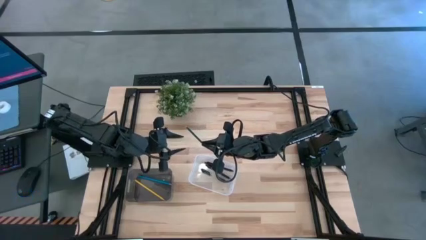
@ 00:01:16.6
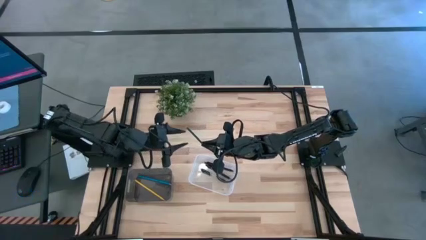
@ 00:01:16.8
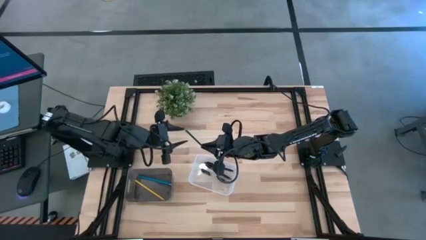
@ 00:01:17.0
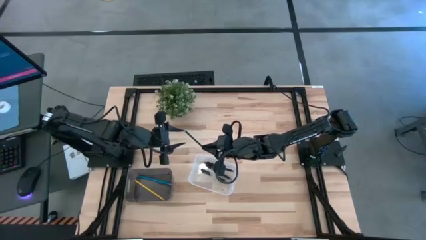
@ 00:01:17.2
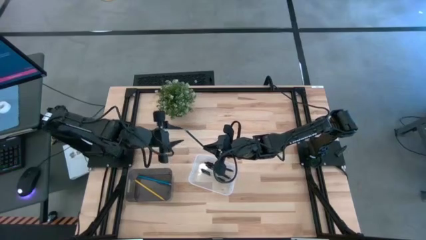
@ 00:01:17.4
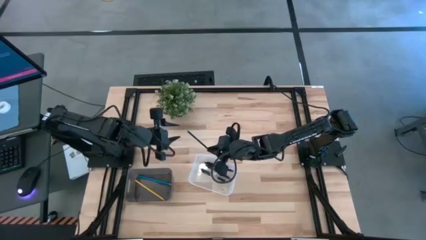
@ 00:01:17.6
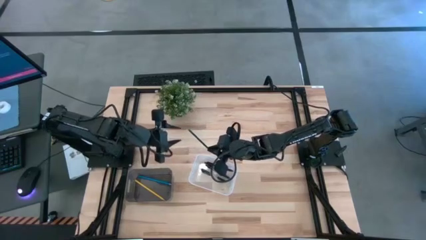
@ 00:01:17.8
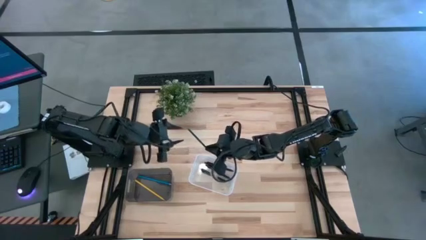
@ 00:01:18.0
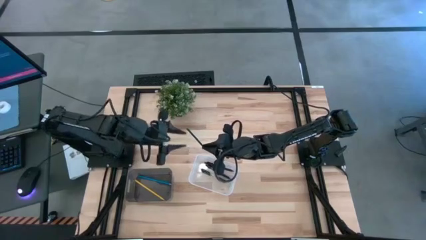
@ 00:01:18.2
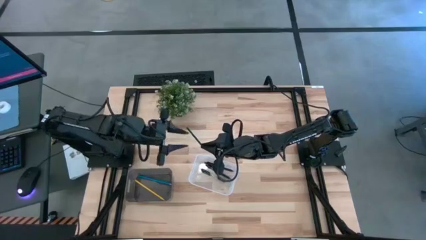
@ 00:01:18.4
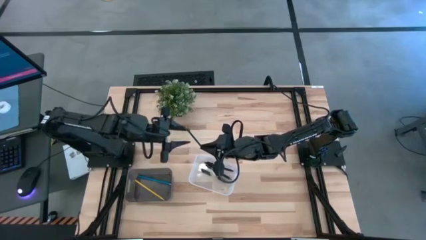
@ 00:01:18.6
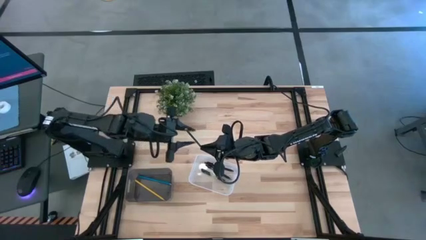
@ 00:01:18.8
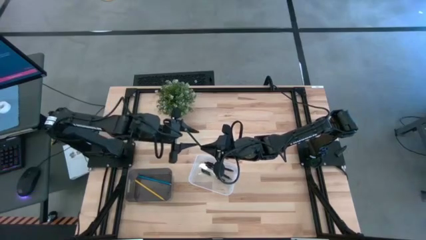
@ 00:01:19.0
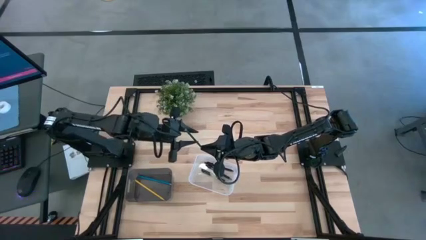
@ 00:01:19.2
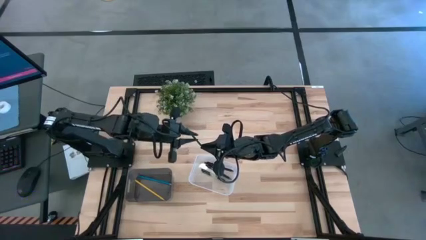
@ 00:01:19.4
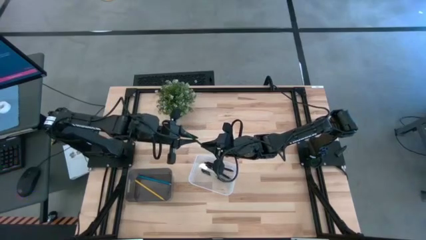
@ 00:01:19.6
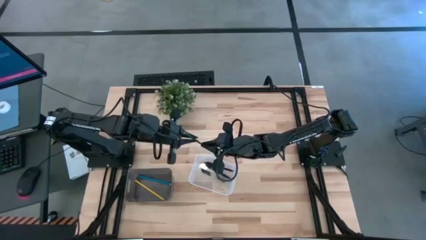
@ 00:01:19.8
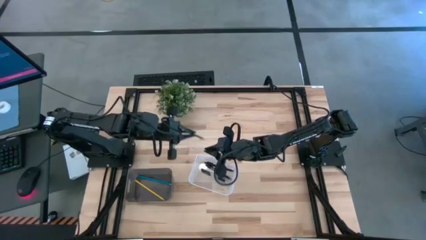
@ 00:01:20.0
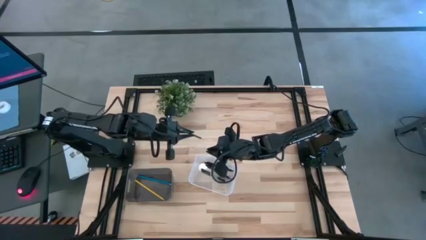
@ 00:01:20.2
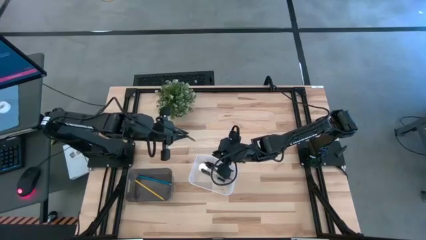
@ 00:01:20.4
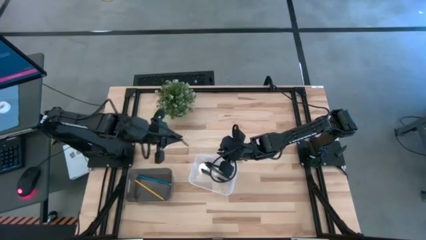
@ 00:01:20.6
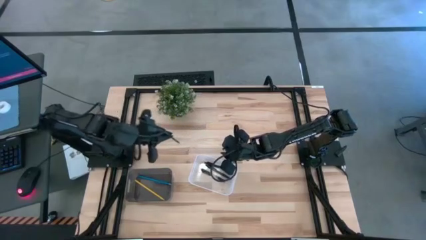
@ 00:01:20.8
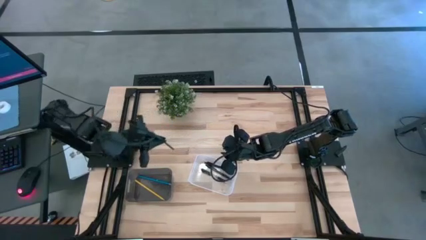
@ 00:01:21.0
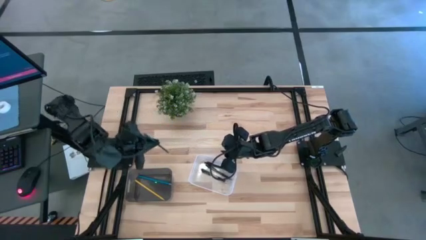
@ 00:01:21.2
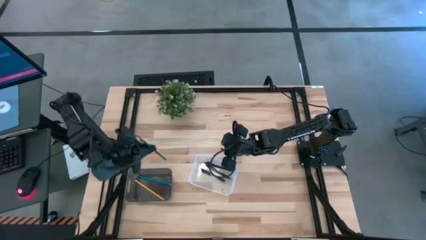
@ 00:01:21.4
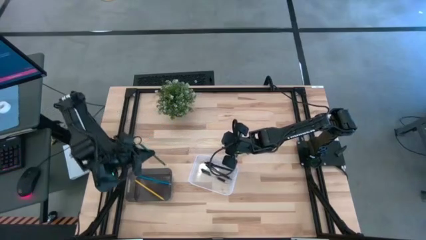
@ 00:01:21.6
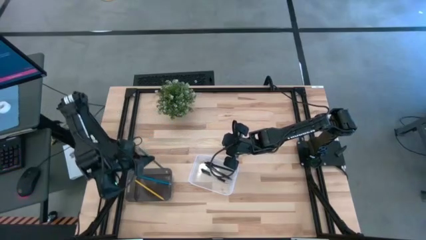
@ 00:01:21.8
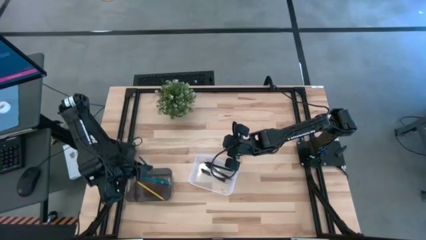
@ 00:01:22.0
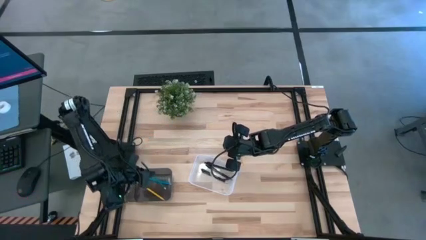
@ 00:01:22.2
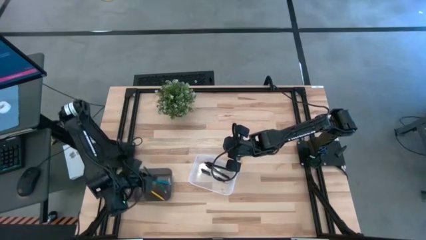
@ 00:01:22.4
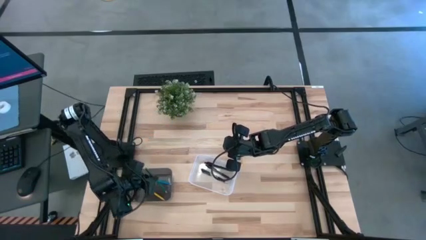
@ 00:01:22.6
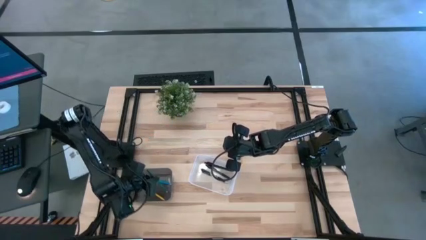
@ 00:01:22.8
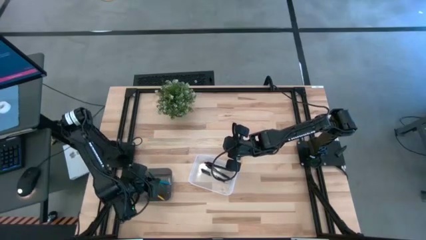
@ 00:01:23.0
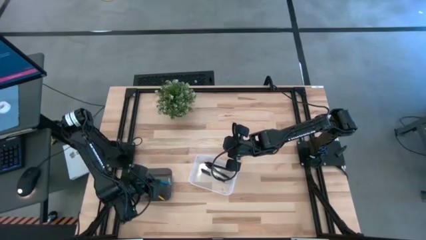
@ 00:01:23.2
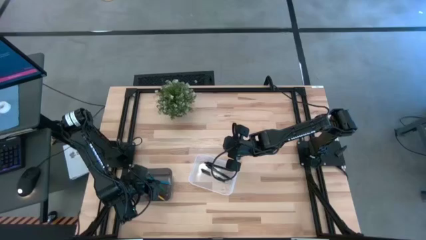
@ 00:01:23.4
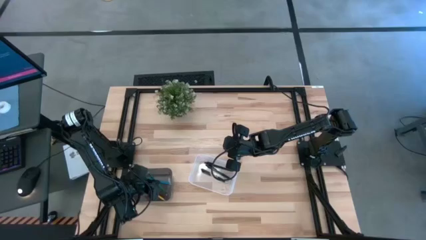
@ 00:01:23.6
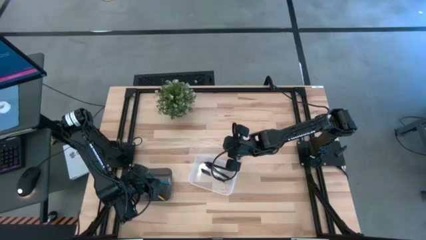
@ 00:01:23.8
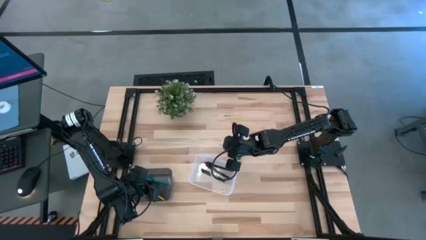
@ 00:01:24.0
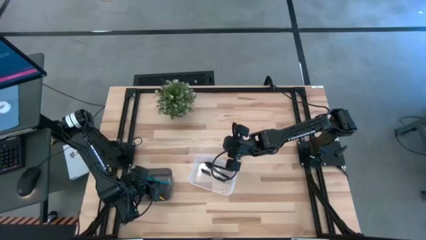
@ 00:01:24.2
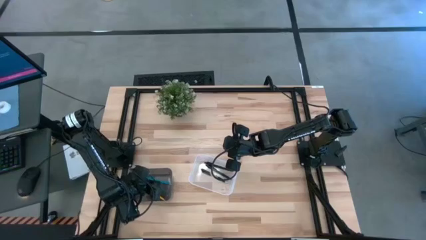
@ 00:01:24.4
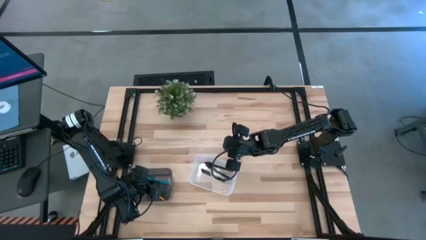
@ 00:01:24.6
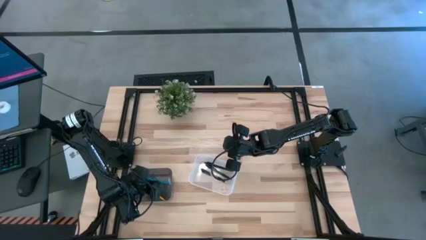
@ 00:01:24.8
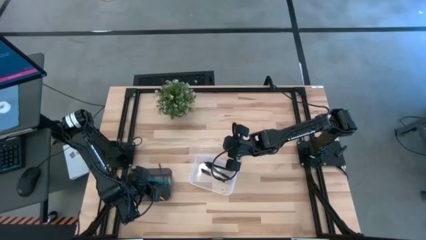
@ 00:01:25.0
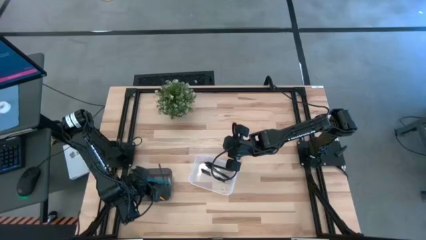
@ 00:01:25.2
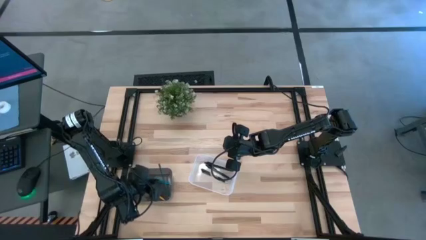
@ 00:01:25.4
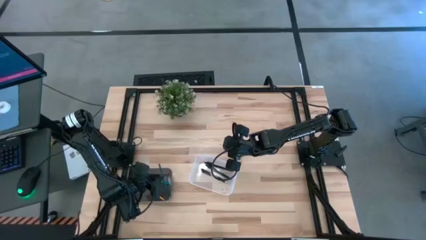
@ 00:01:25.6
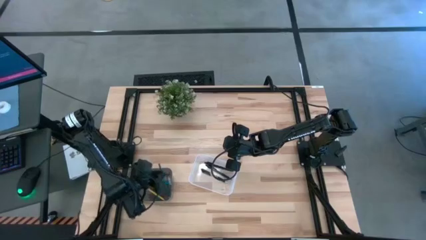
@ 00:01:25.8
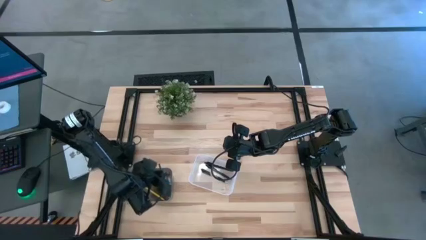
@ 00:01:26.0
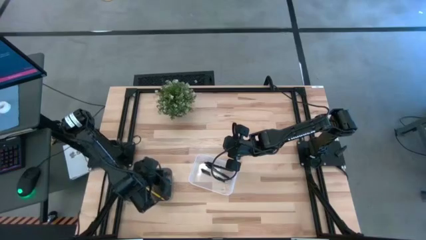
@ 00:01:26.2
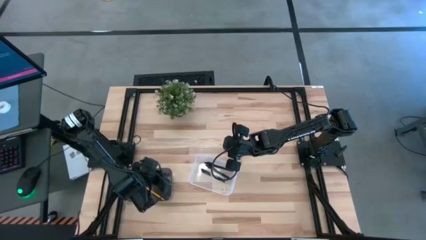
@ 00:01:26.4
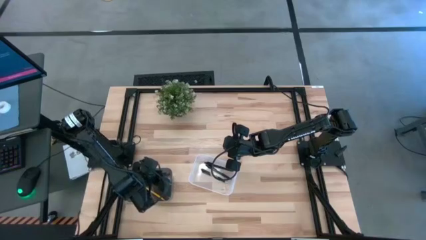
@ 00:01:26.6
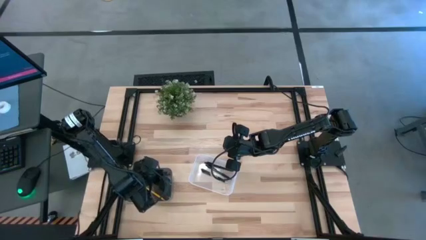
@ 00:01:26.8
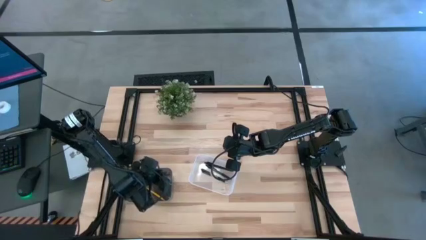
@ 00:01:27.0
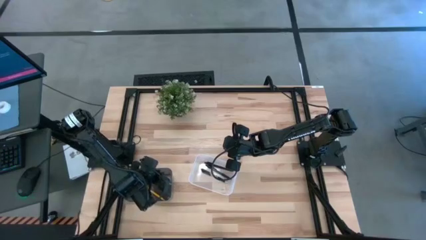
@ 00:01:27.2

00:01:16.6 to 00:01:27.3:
Task: Sort pens & pencils
Put the green pencil into the black bin

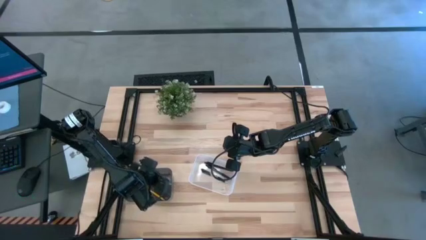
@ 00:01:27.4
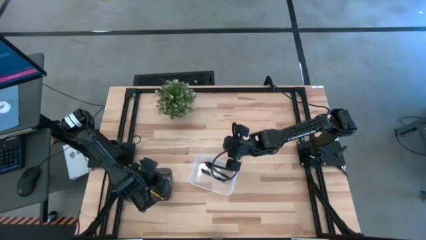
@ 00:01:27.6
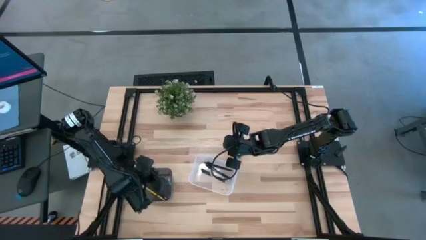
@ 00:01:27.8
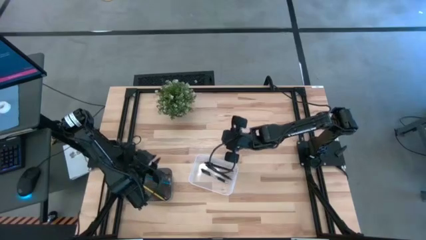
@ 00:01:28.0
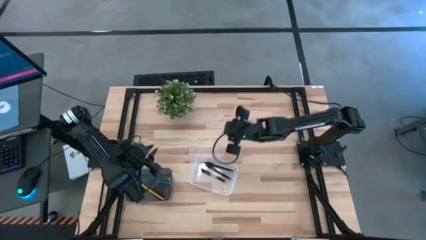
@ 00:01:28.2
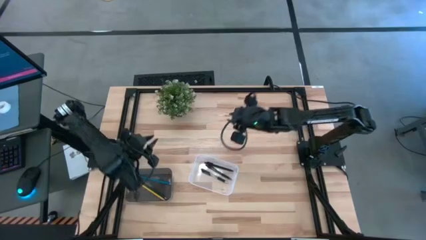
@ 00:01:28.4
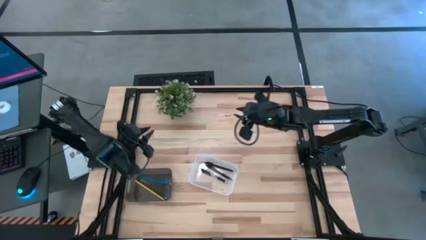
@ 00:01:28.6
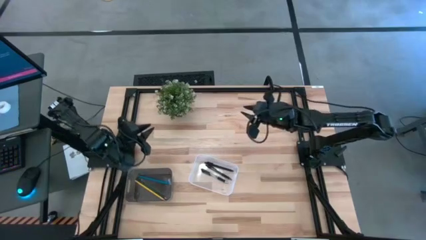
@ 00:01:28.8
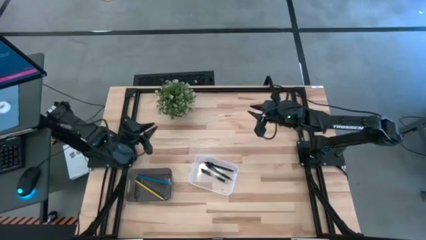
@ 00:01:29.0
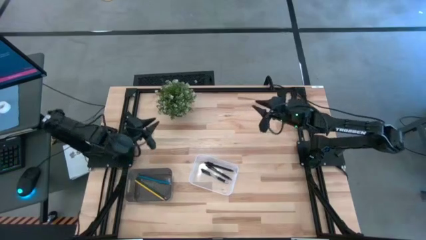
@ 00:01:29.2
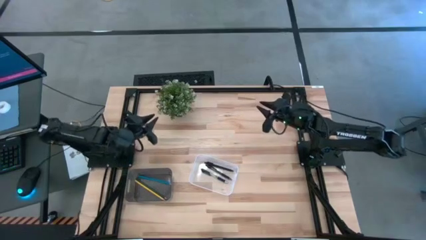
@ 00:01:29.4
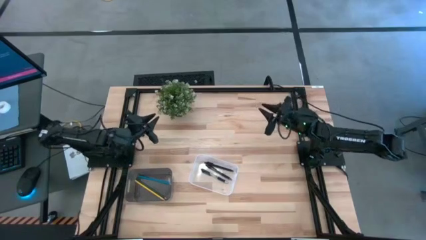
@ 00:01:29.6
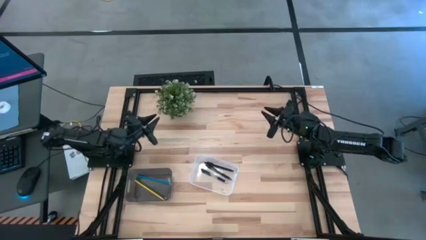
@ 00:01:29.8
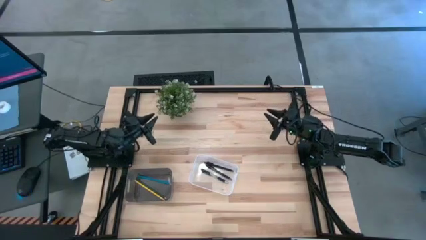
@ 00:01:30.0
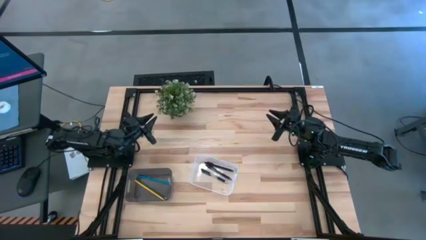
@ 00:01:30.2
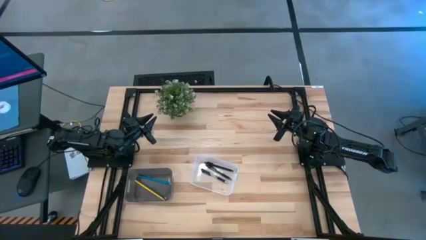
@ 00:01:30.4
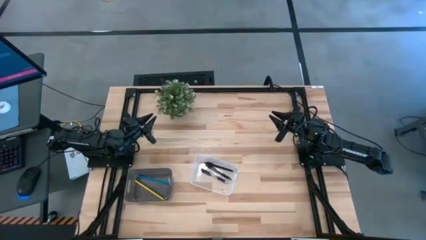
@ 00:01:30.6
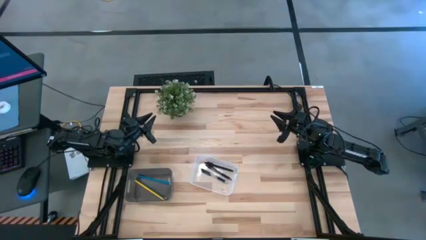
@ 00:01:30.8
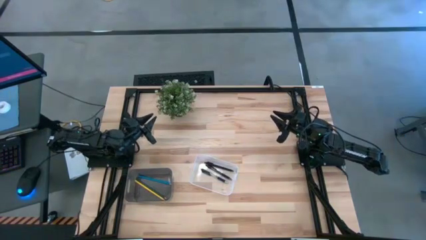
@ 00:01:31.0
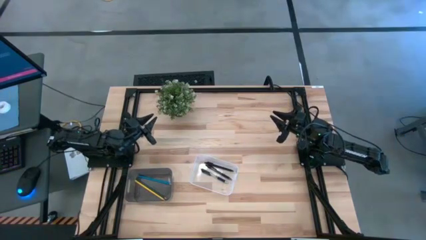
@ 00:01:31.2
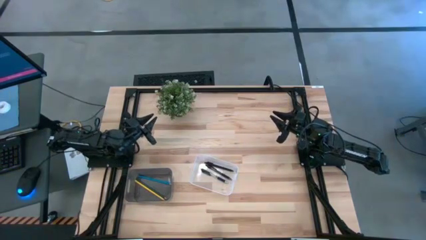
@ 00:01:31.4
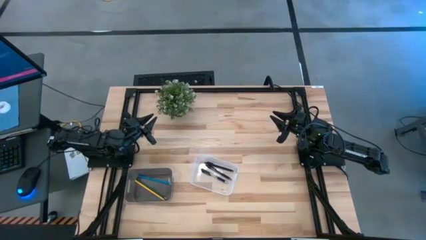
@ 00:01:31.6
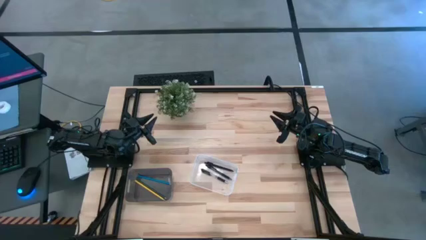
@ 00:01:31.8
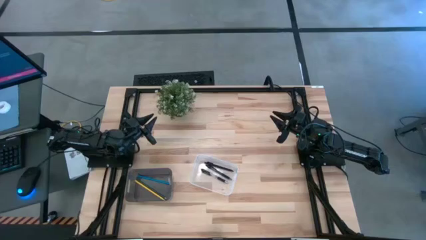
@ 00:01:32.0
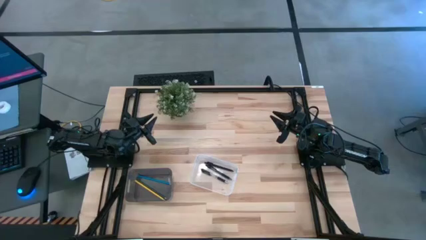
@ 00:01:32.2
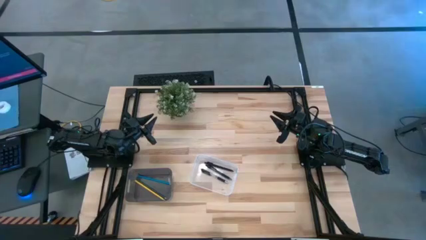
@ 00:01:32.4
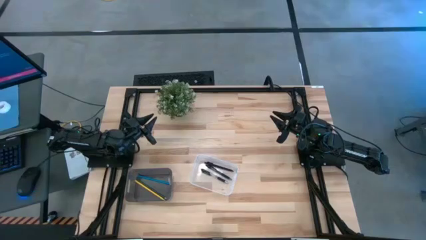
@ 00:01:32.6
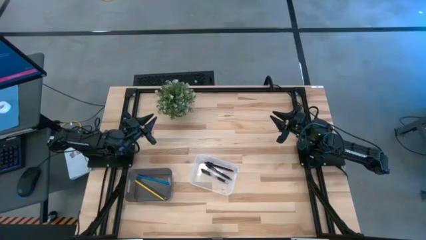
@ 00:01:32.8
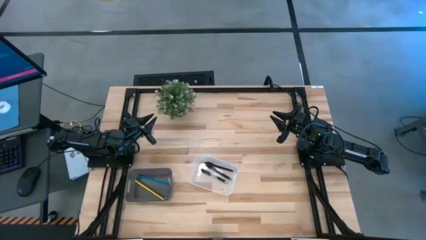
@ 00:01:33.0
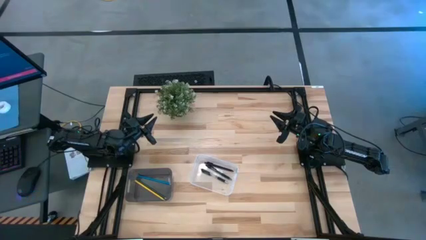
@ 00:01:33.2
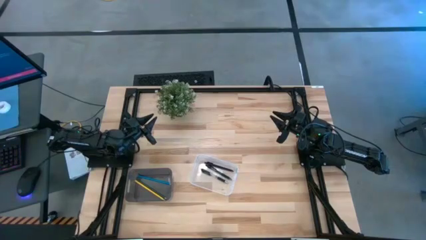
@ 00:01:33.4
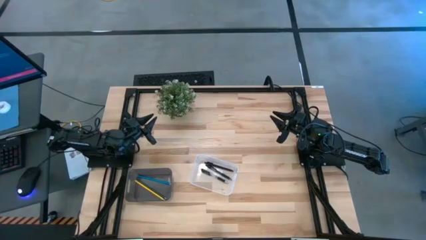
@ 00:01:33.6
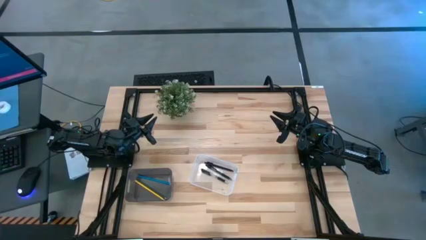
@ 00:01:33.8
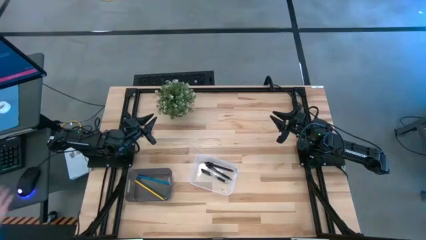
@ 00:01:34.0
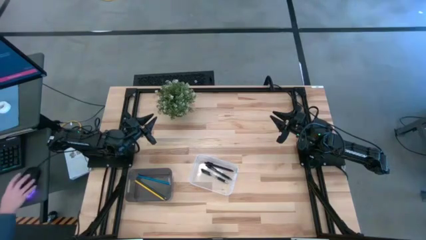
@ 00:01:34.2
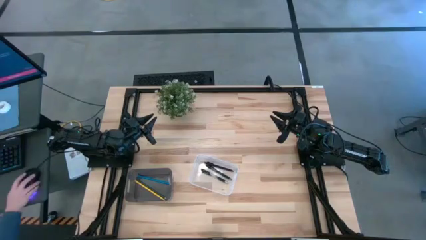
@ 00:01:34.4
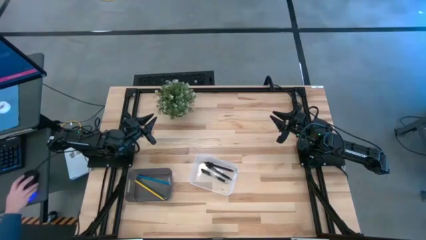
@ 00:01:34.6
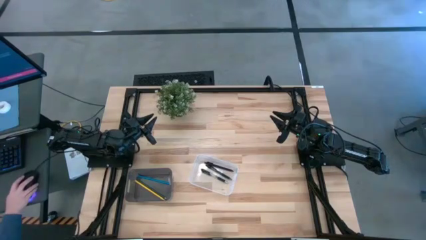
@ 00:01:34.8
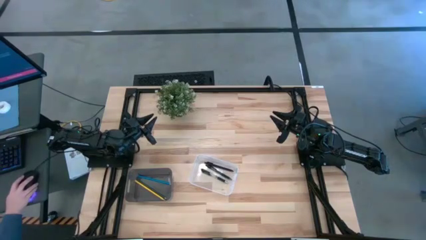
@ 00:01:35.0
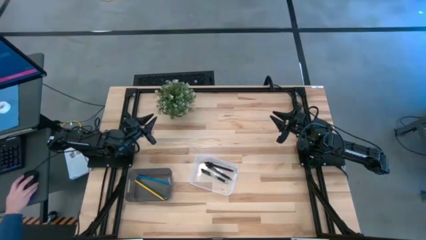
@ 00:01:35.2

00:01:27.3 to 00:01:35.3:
Return to Home Position
